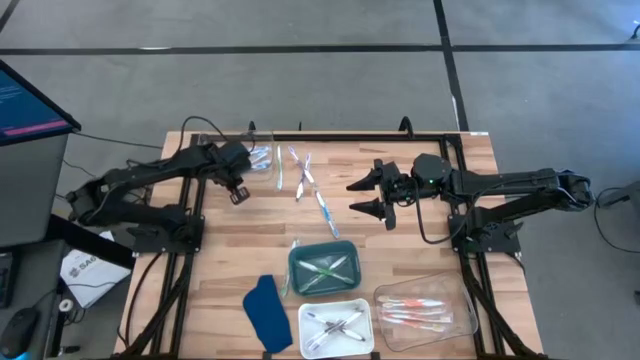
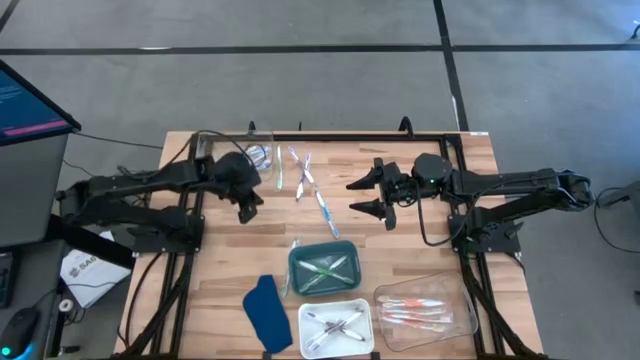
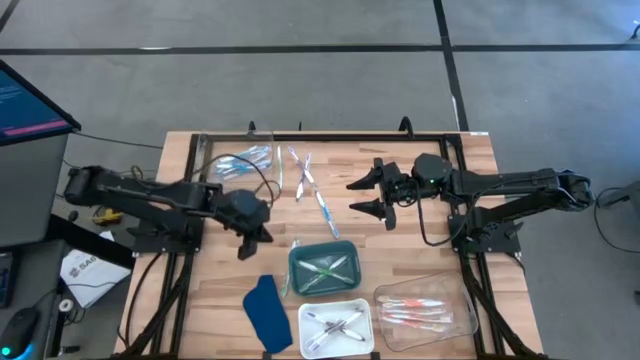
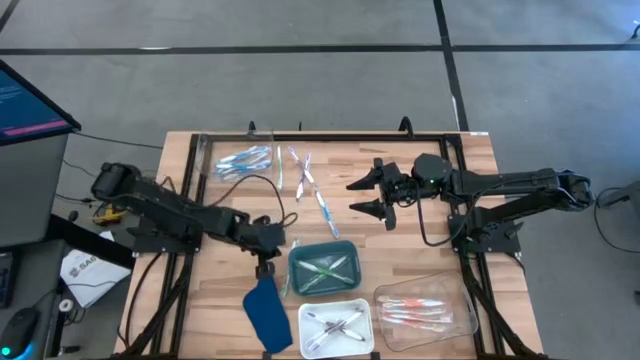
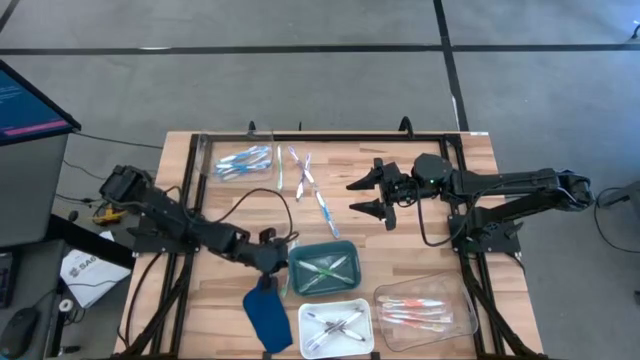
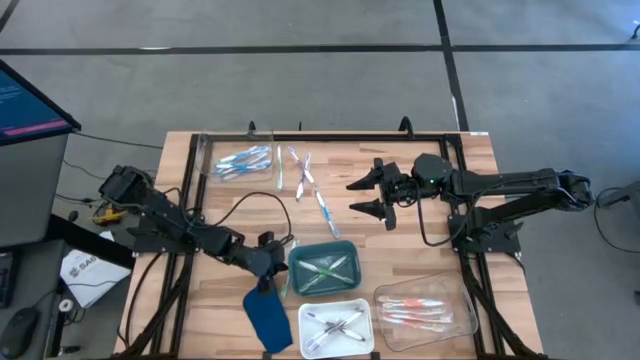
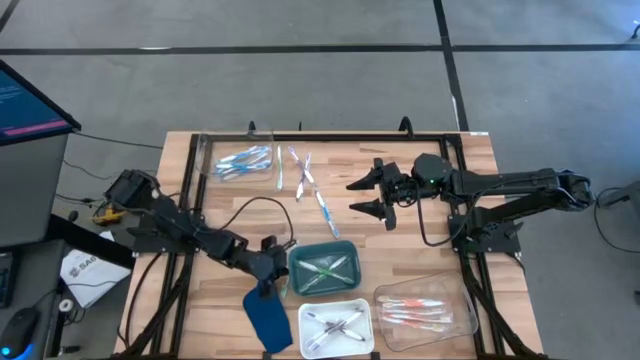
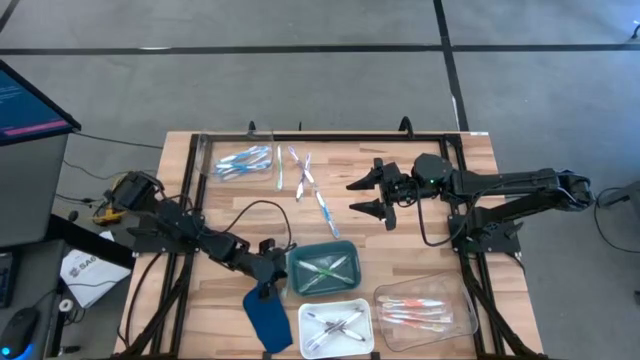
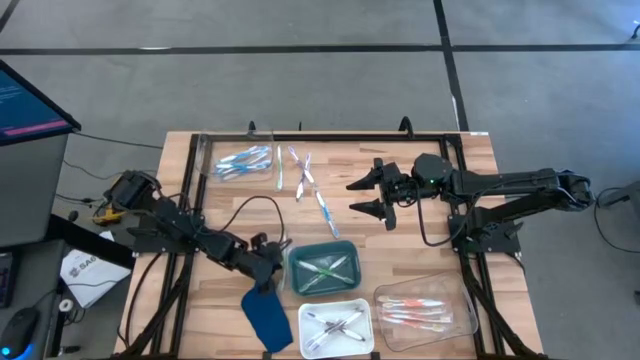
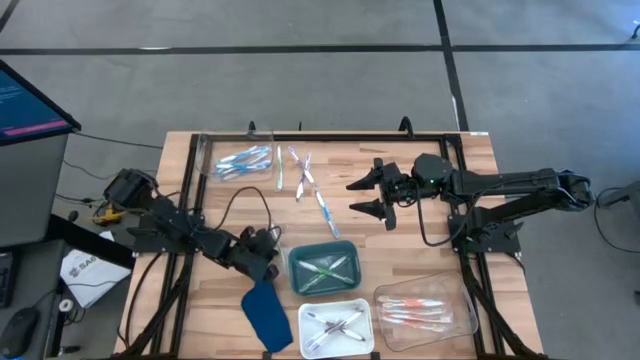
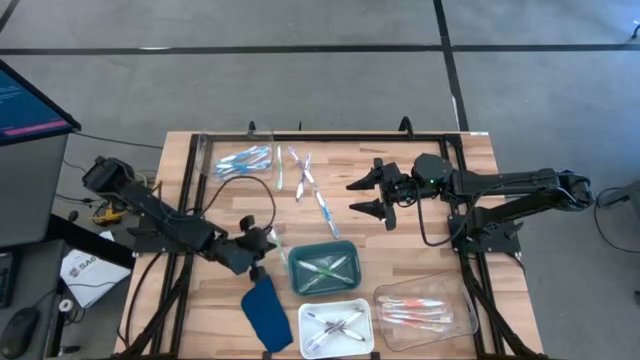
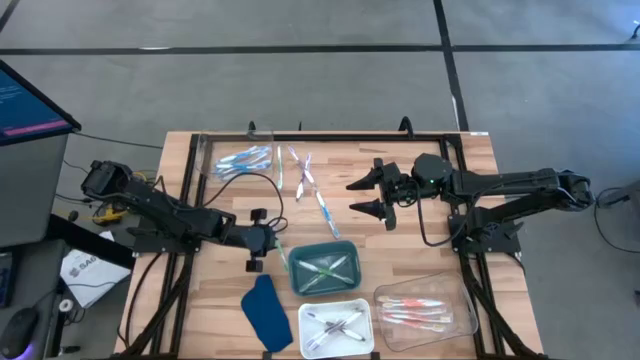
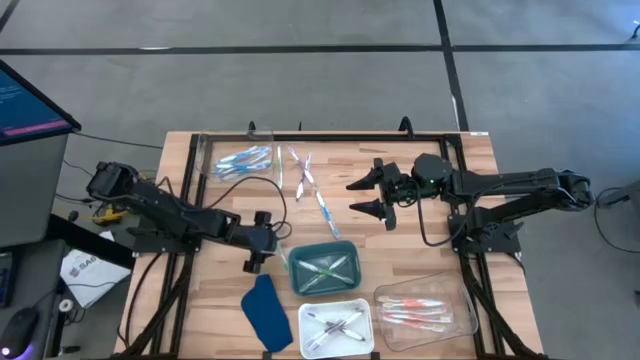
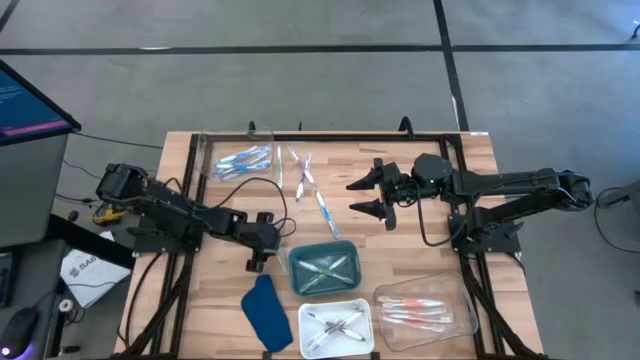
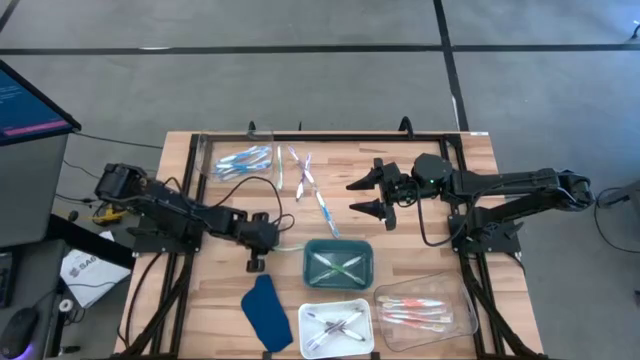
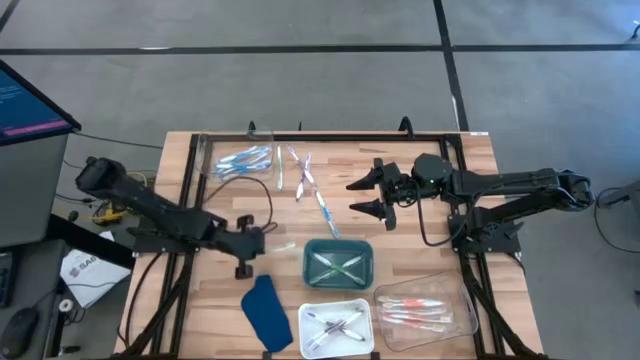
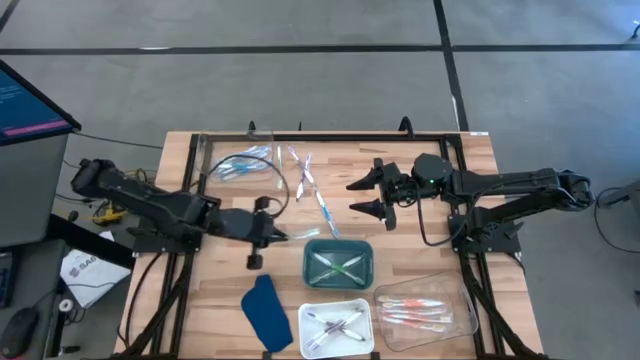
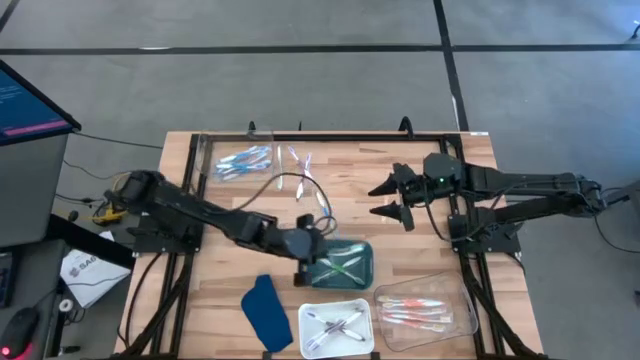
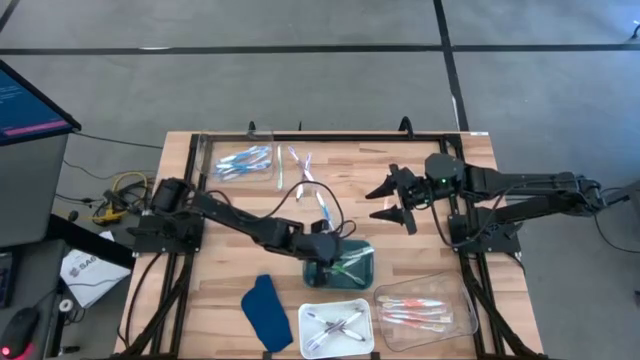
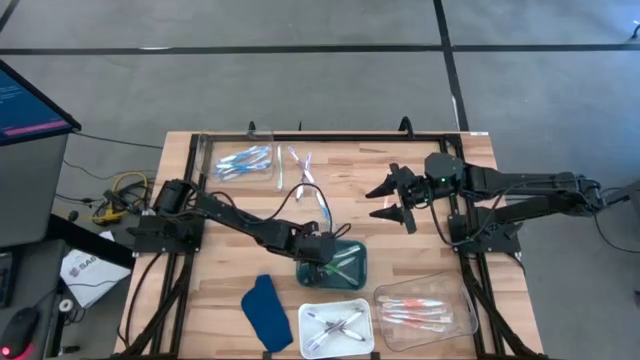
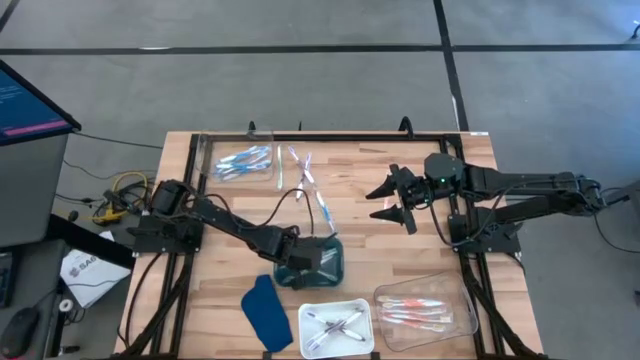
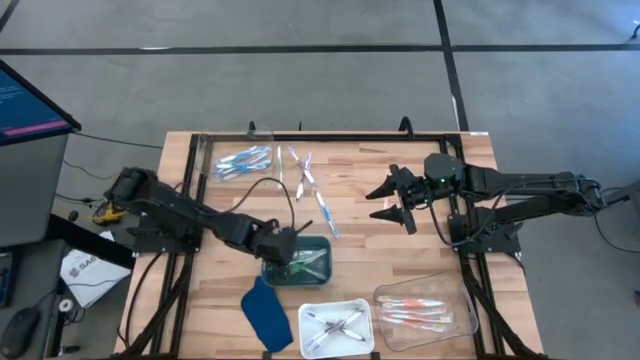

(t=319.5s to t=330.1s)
Task: Pick & Place Toothbrushes
Put the green toothbrush into the green bin

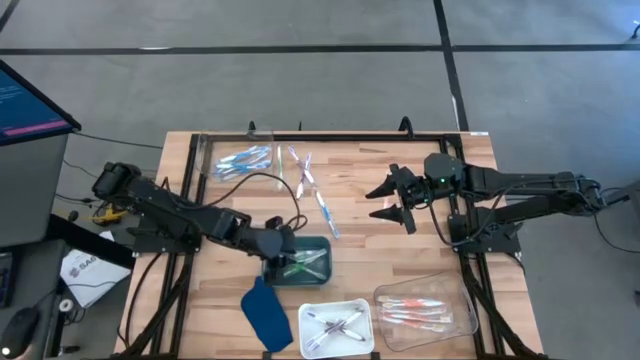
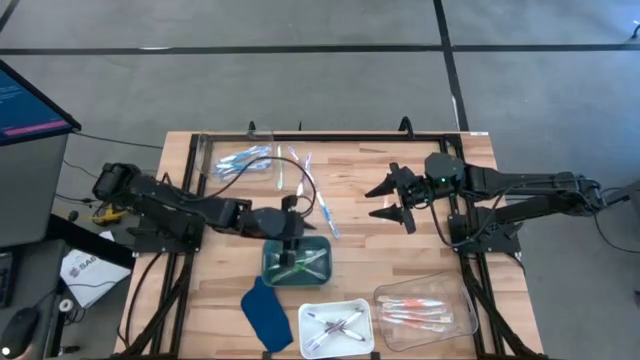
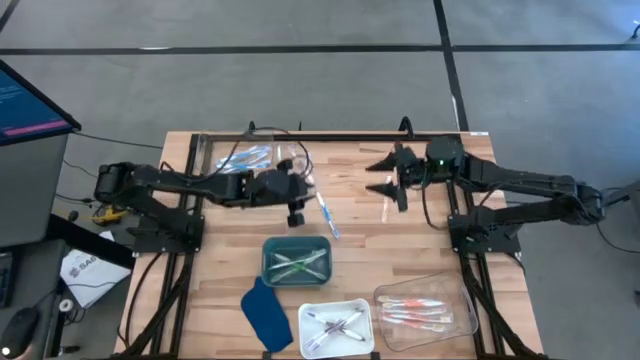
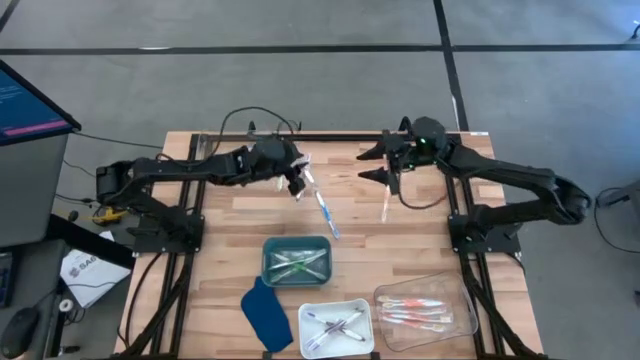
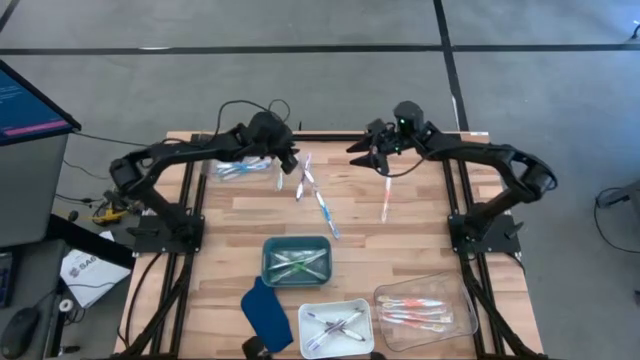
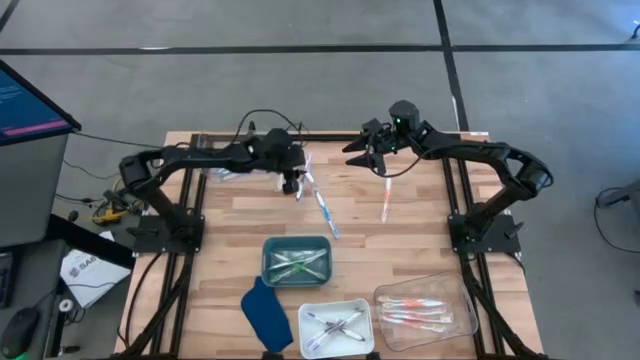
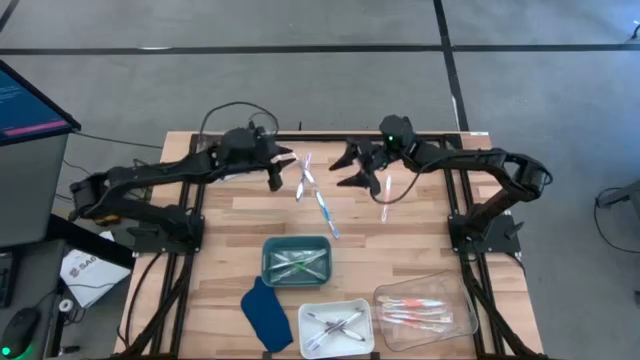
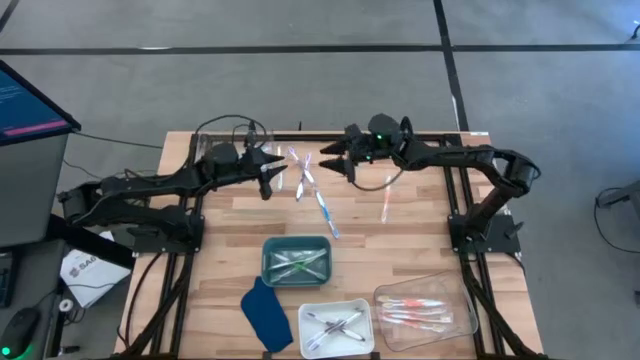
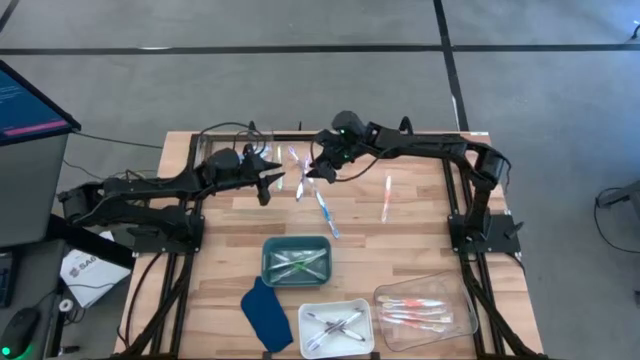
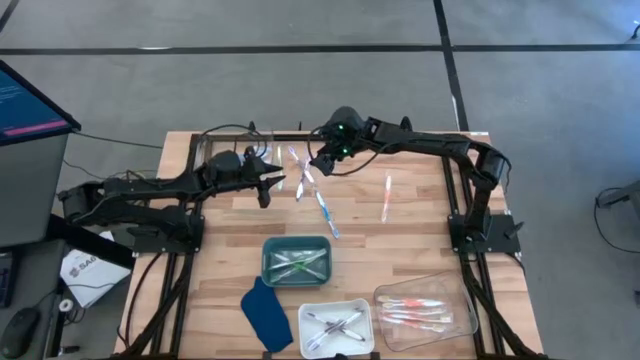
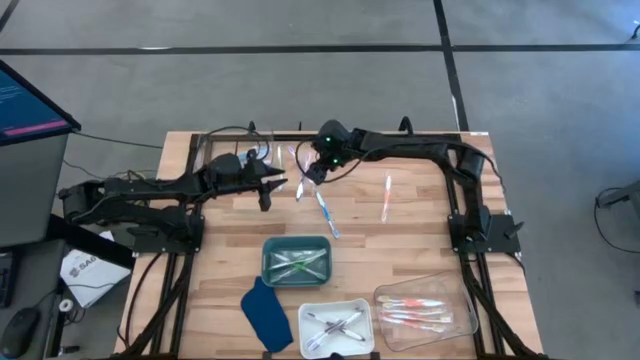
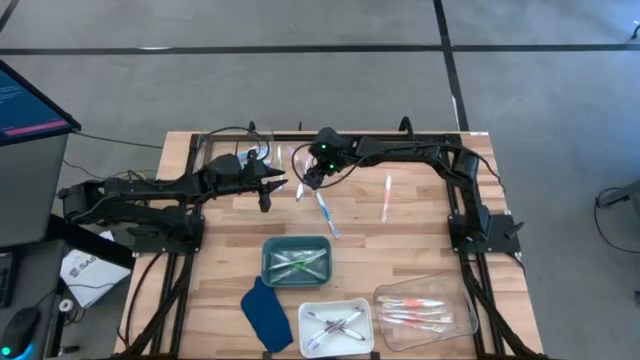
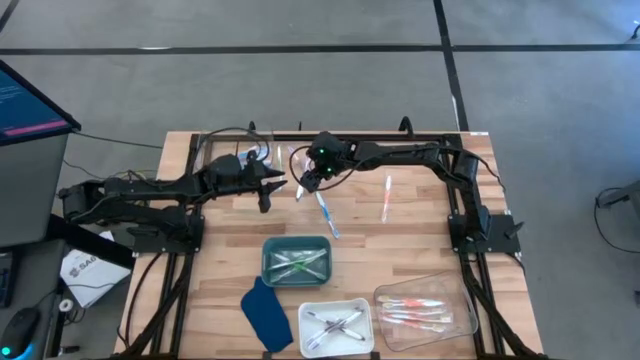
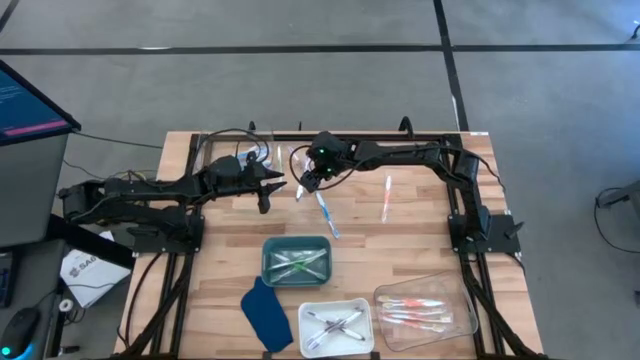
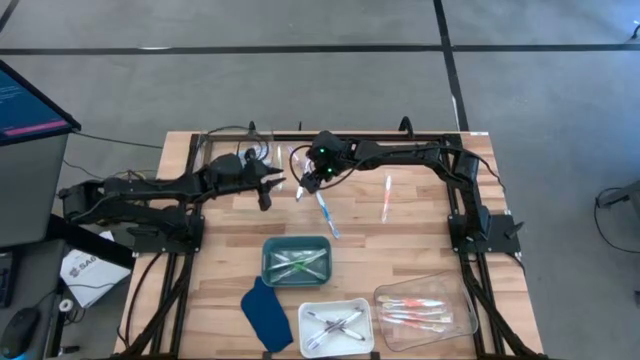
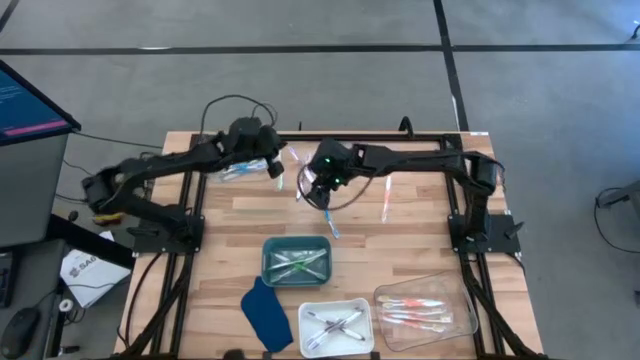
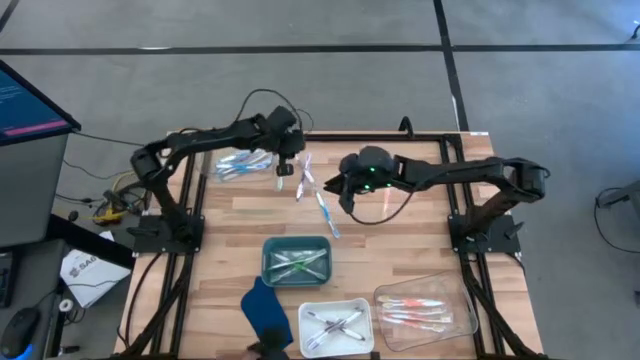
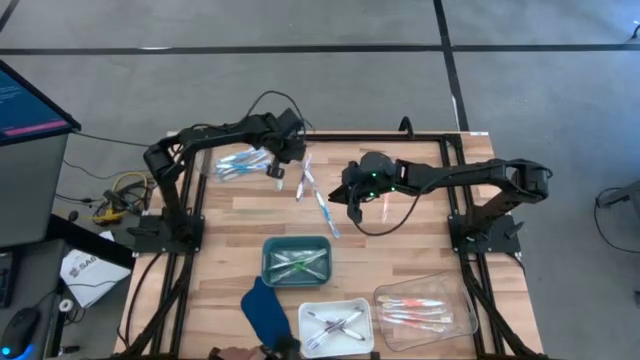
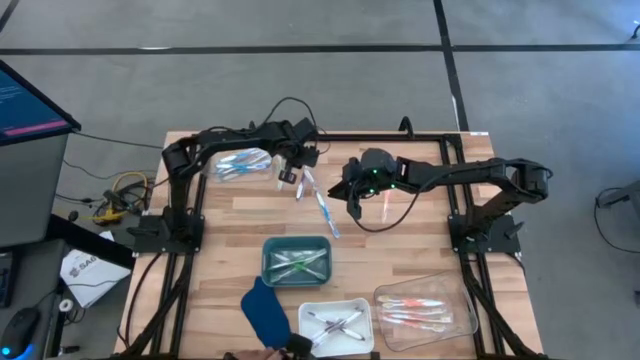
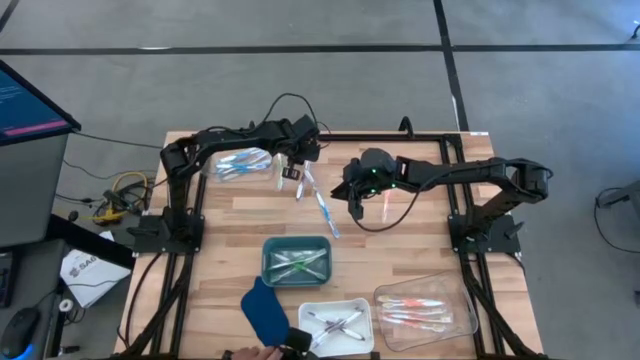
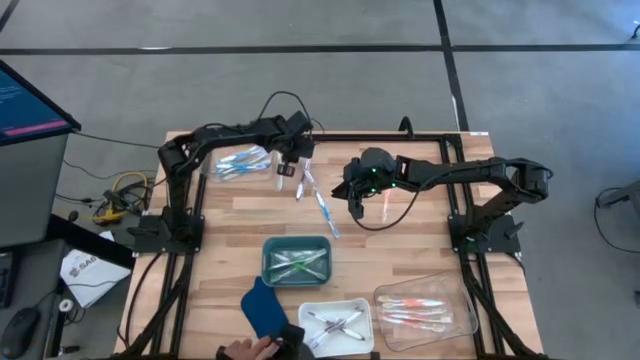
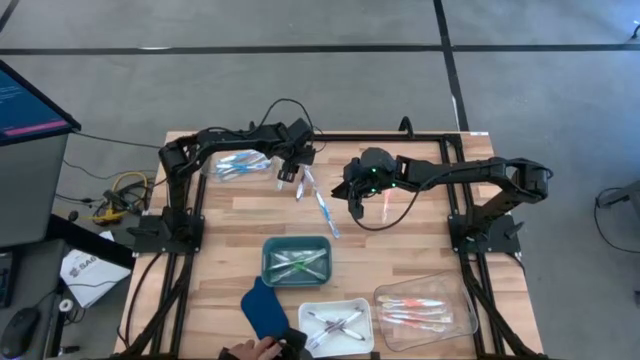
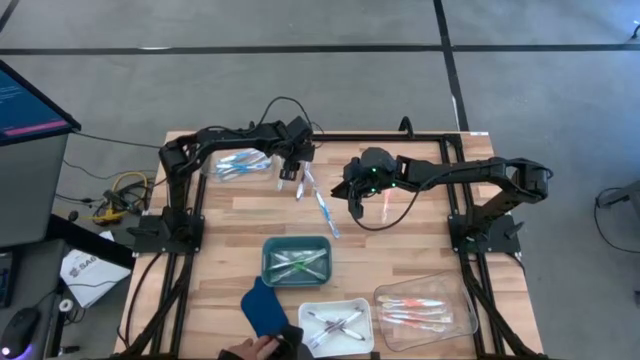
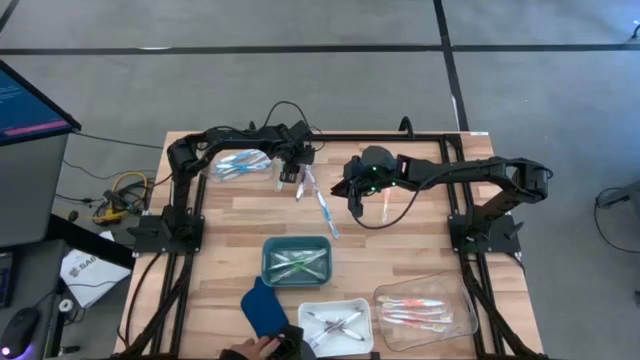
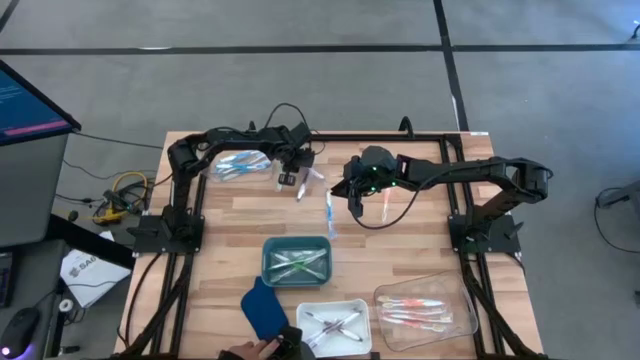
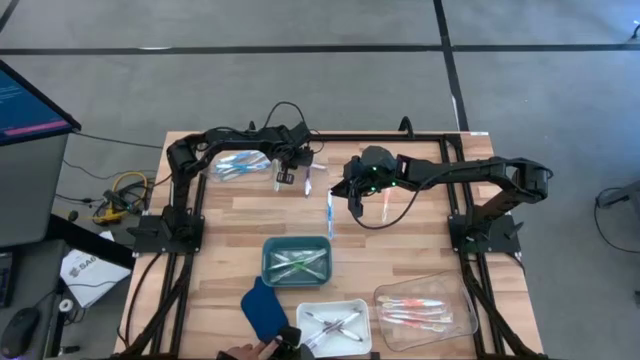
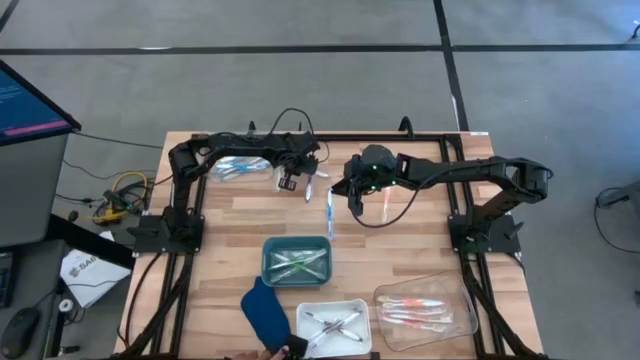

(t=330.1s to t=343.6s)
Put the purple toothbrush into the white bin
